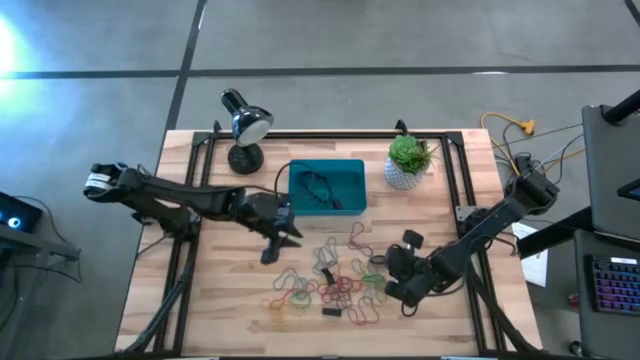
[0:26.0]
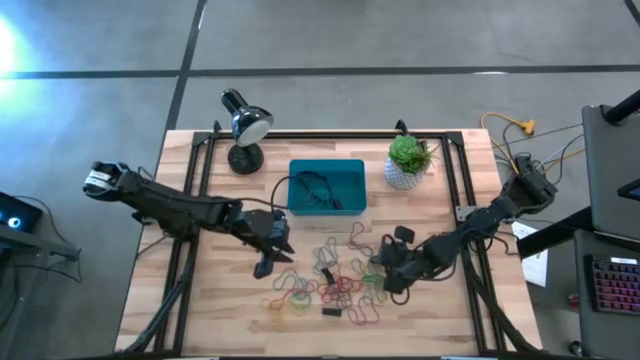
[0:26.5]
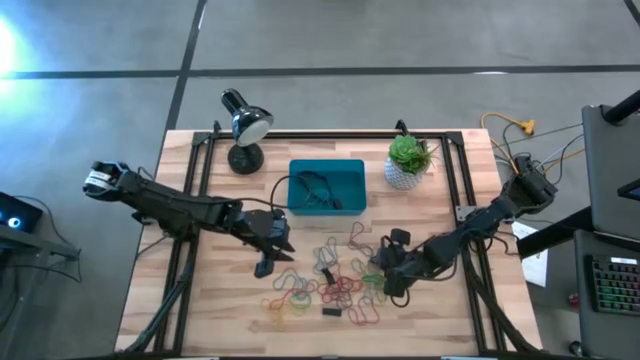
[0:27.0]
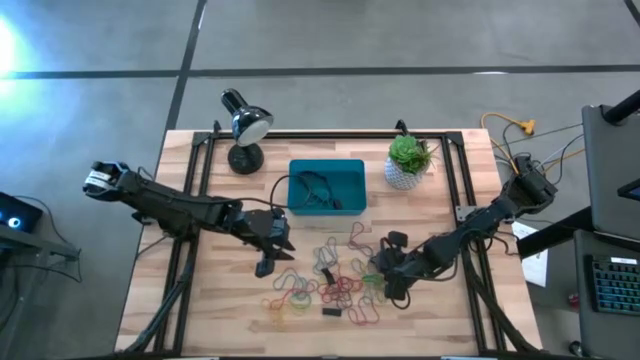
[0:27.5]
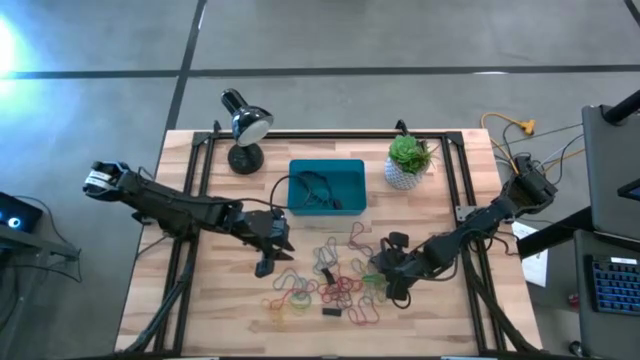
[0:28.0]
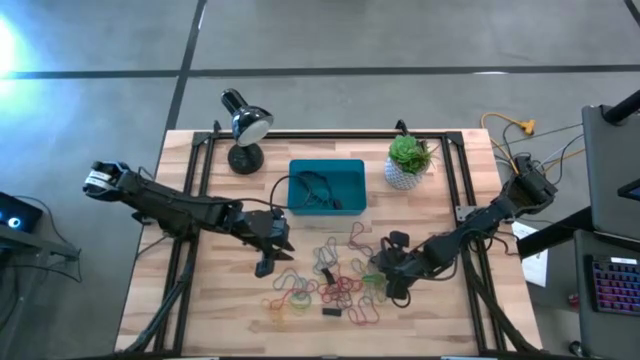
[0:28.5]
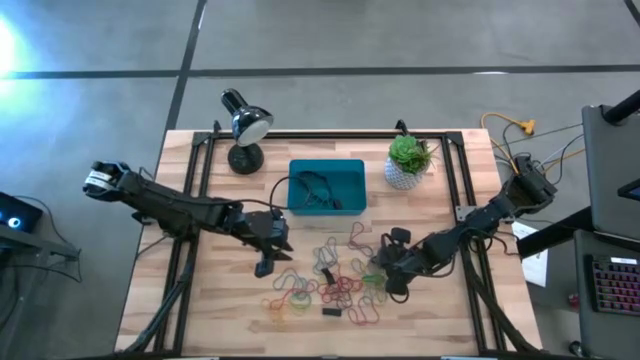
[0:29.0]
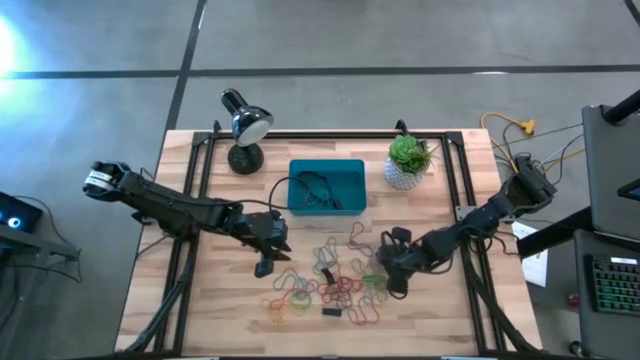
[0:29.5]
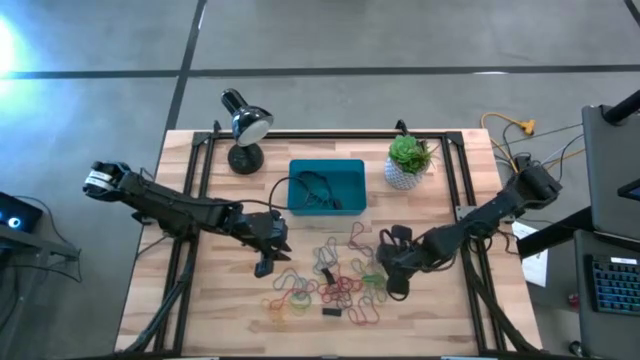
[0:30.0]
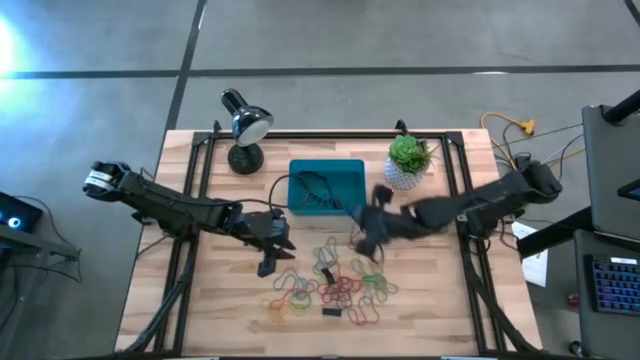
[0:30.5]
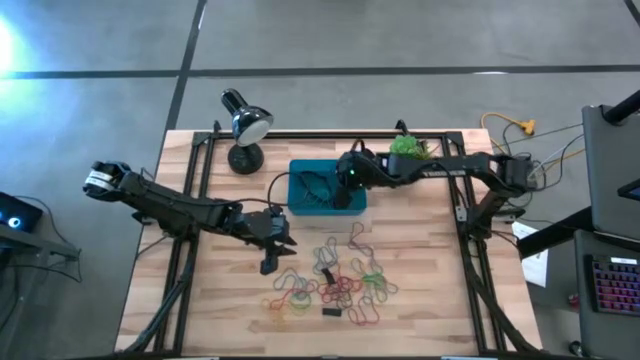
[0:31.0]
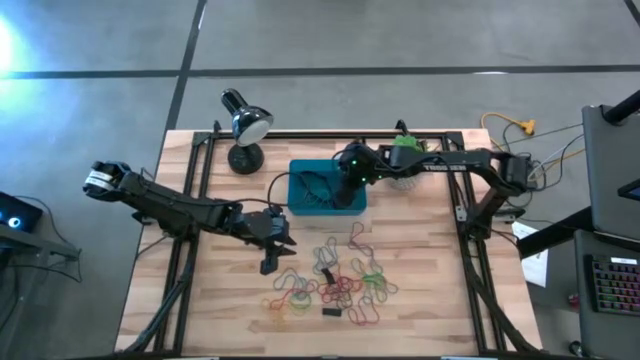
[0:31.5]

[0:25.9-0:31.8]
Task: Pick and place rubber bands into bin
Put the top black rubber band into the dark blue bin

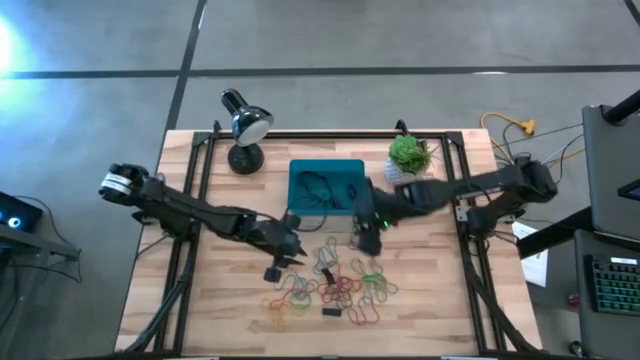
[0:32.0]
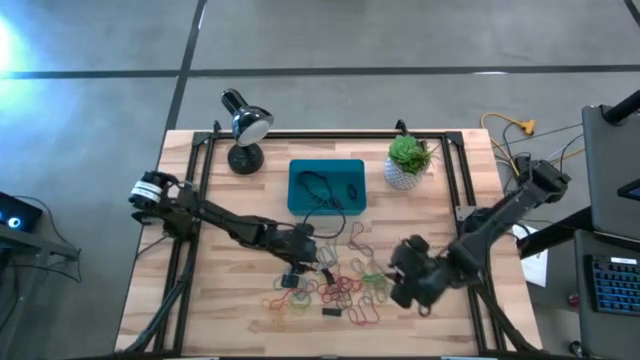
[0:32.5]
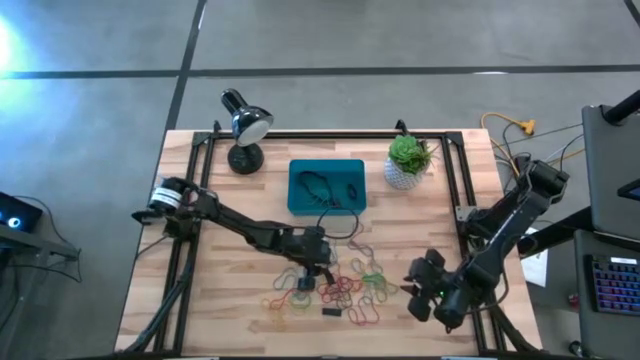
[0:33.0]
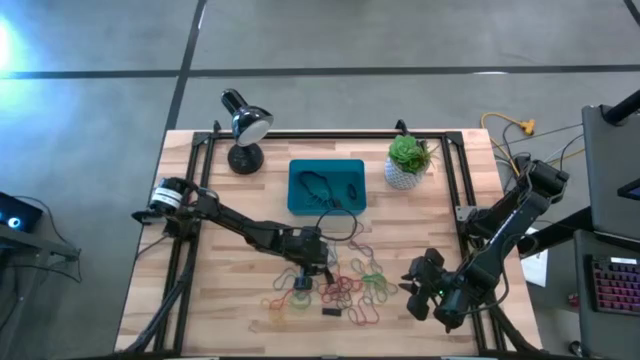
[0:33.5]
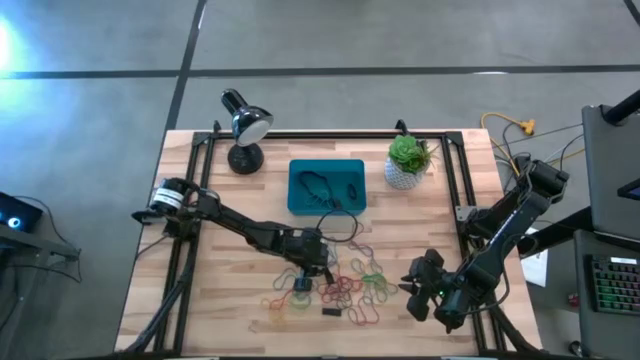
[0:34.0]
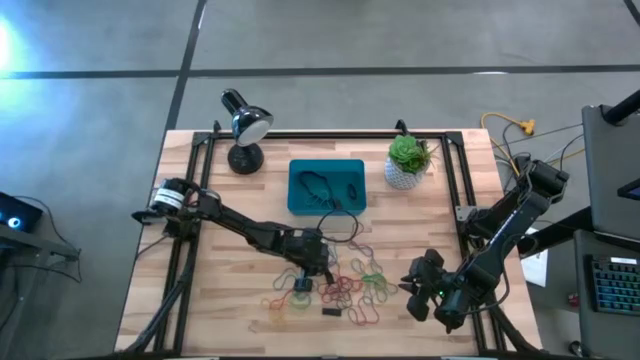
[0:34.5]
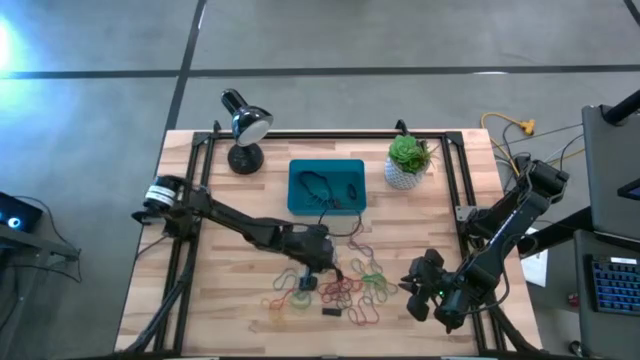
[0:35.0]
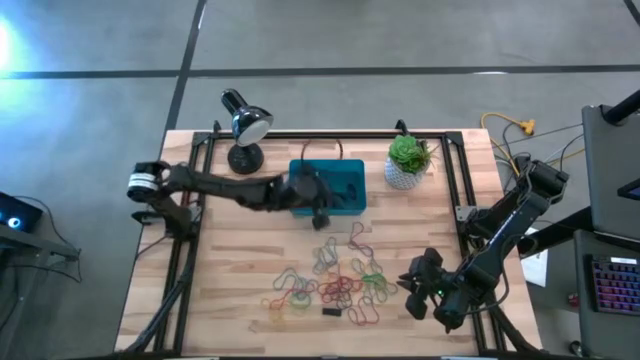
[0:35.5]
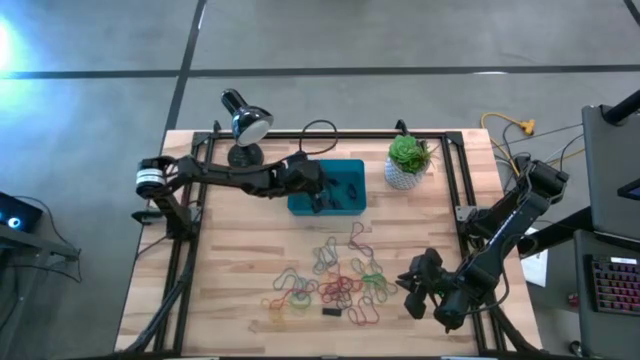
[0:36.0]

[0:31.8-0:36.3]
Put the black rubber band into the dark blue bin

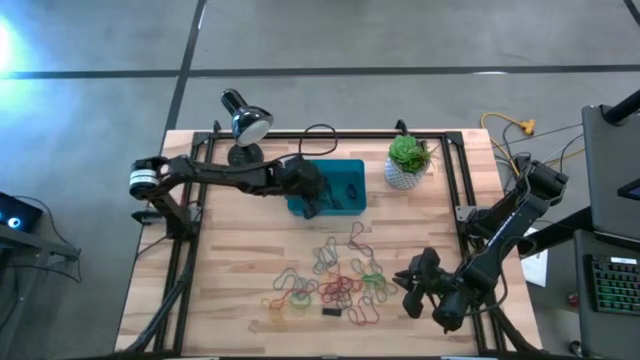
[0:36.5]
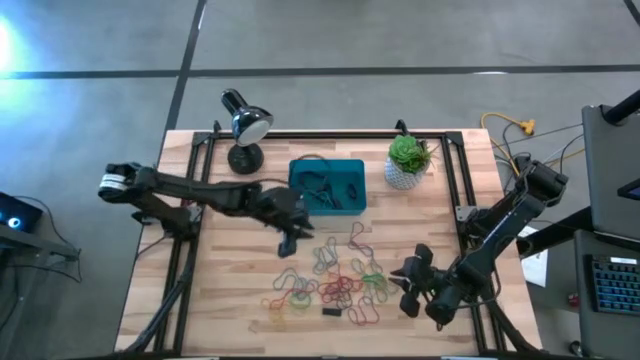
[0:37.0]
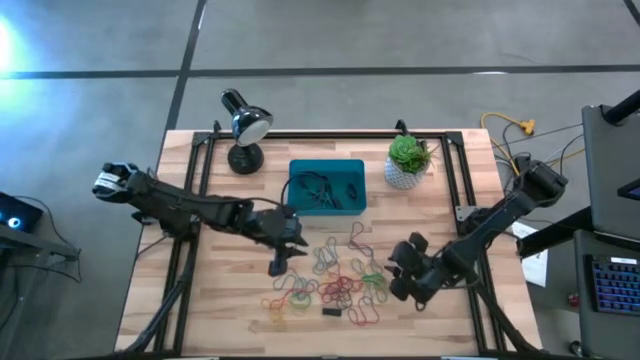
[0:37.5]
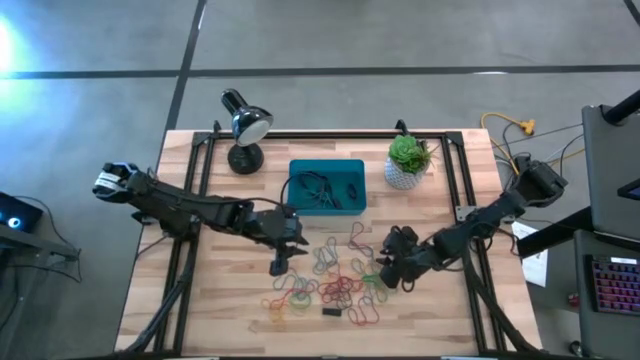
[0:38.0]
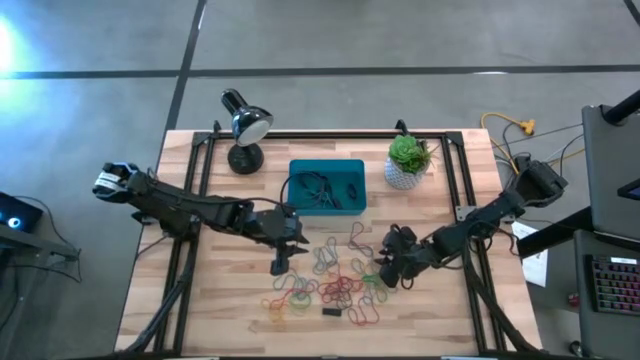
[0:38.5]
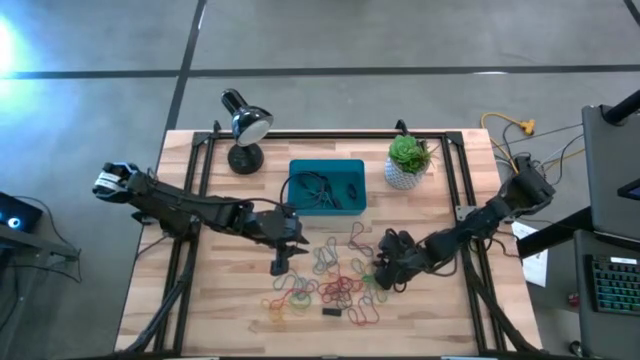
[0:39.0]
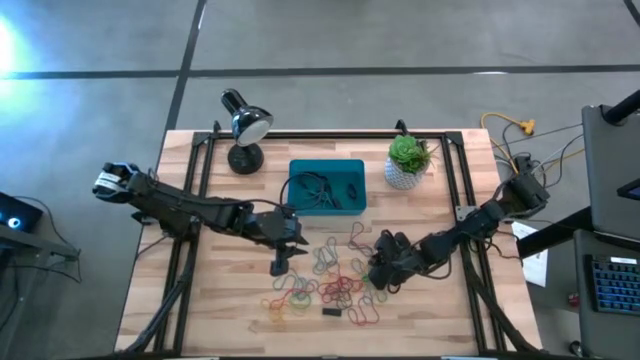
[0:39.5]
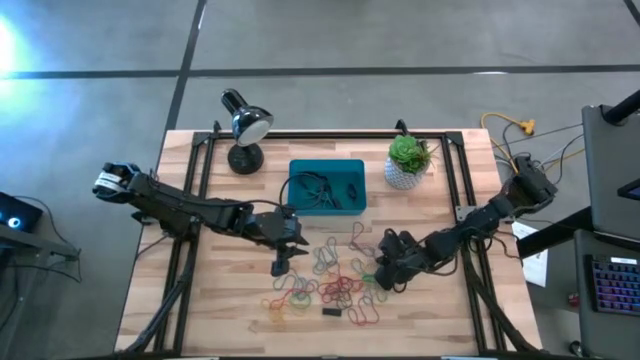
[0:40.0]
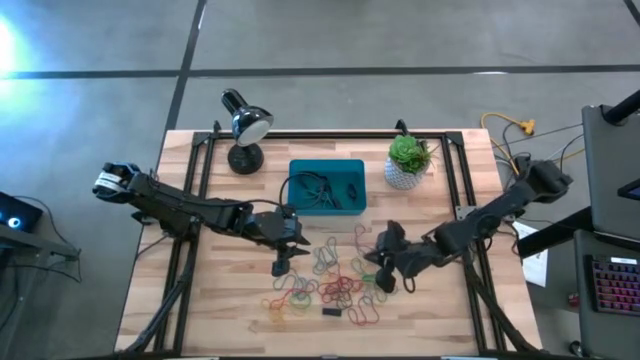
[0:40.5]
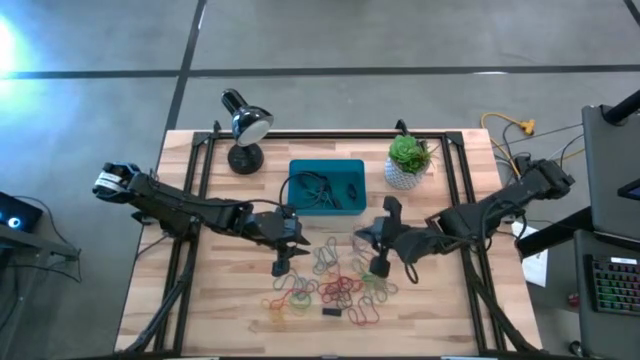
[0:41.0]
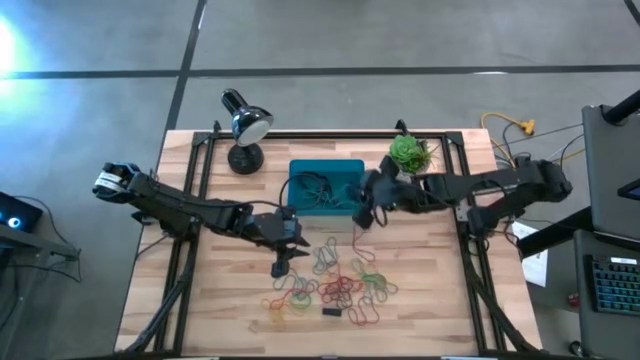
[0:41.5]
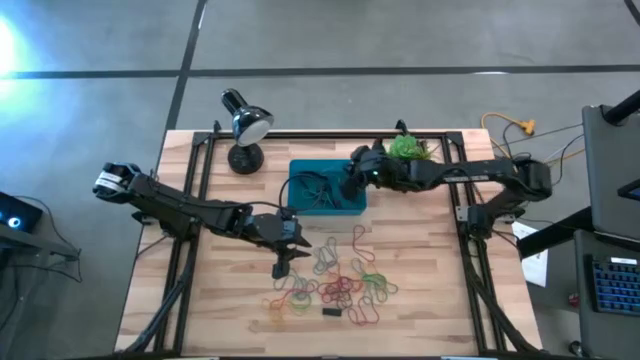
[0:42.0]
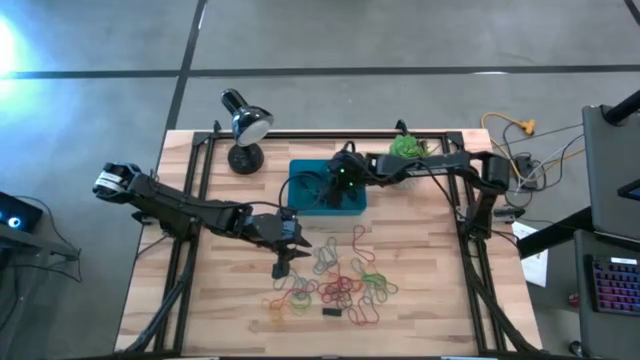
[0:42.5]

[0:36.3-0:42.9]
Put the blue rubber band into the dark blue bin

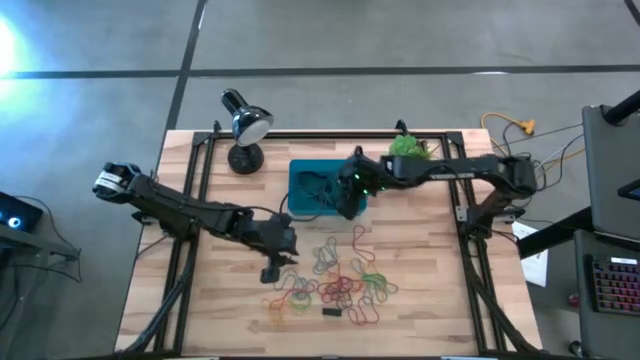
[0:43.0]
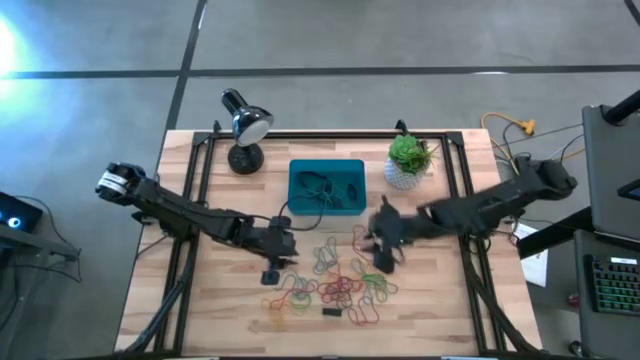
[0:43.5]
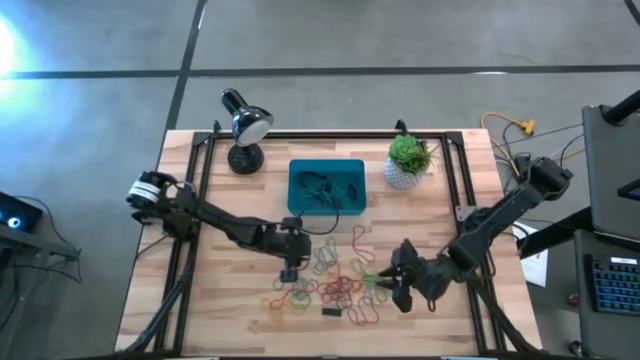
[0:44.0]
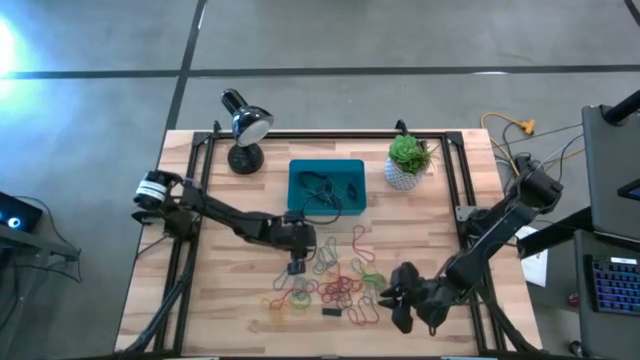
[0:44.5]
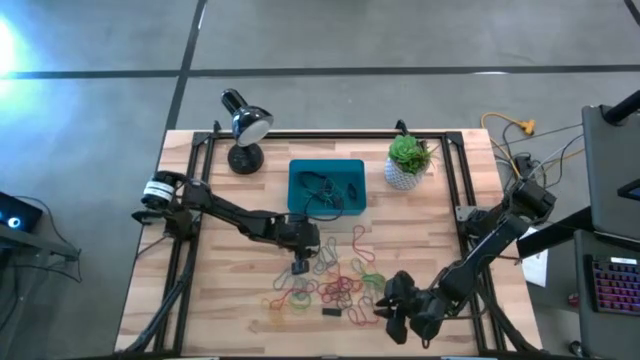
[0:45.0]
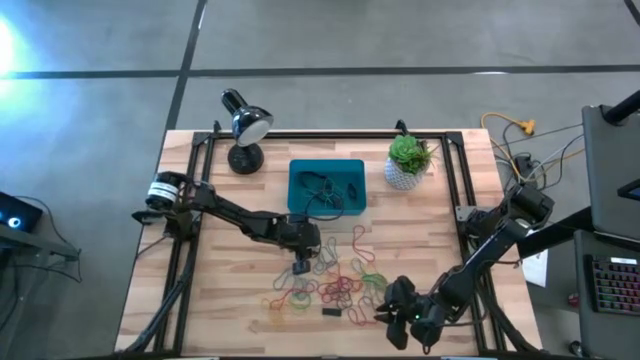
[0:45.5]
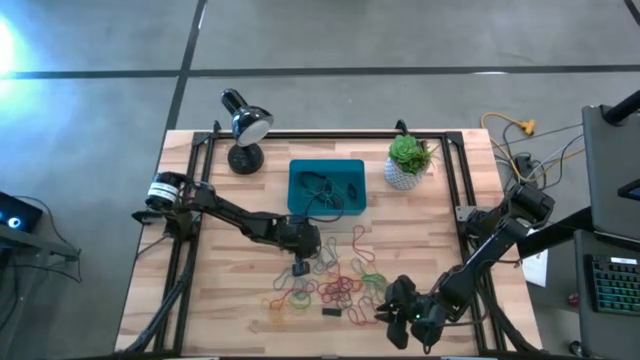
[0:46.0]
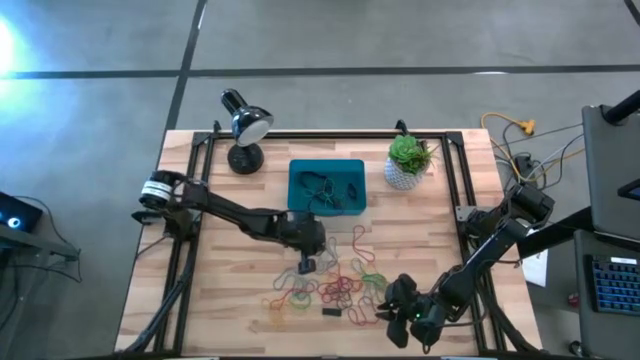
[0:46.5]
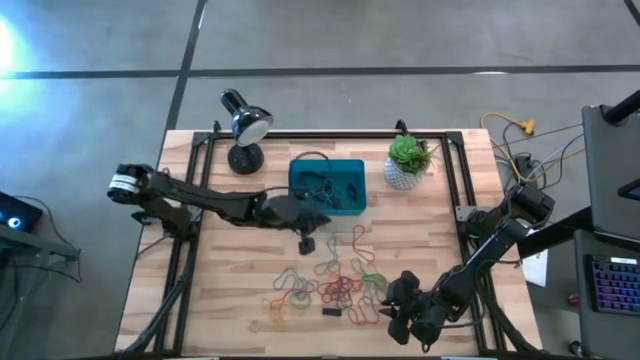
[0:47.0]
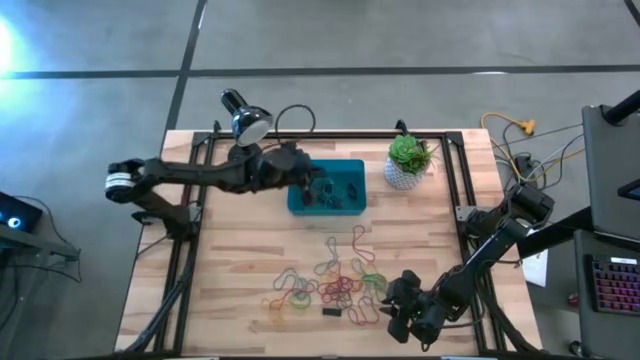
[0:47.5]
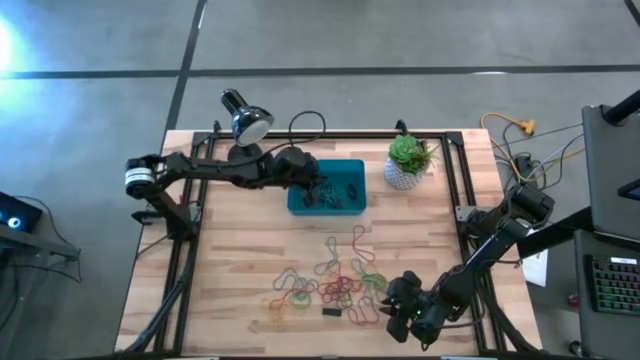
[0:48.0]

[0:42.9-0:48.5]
Put the blue rubber band into the dark blue bin
